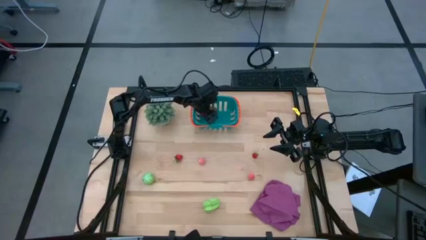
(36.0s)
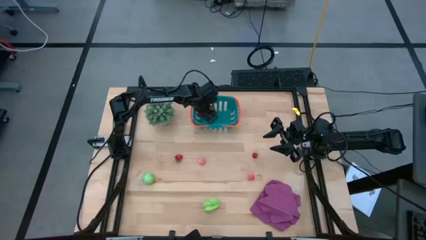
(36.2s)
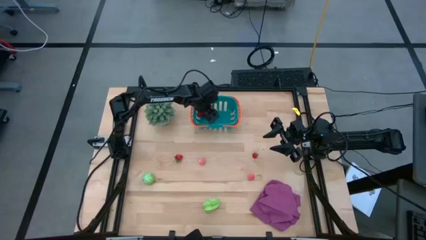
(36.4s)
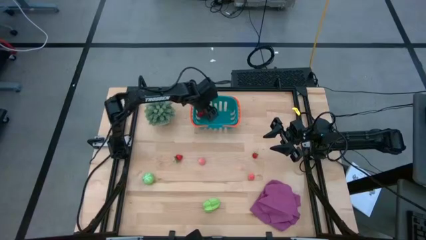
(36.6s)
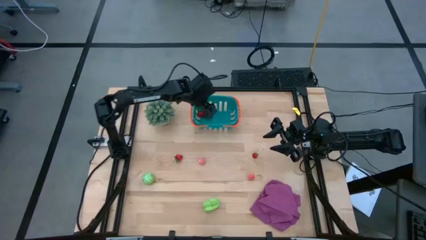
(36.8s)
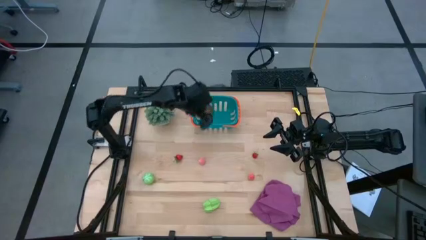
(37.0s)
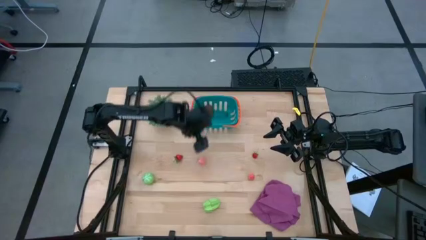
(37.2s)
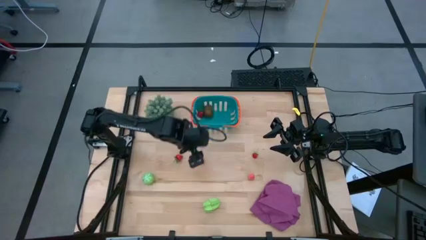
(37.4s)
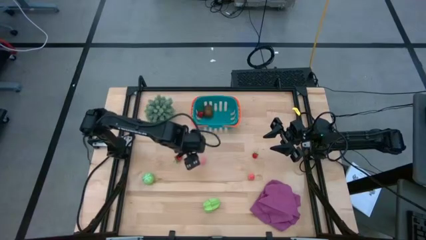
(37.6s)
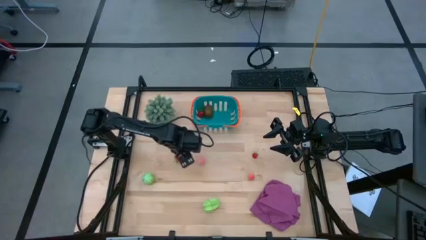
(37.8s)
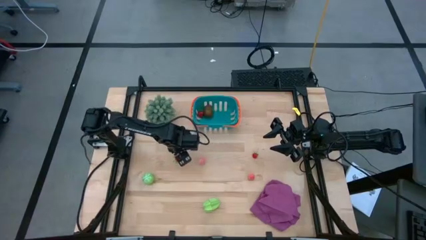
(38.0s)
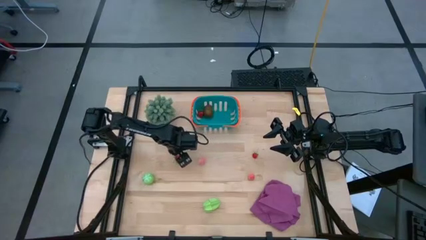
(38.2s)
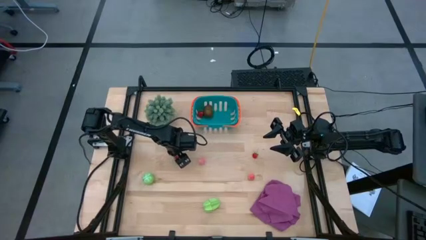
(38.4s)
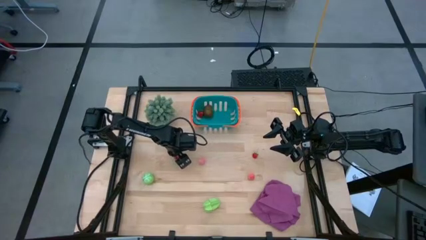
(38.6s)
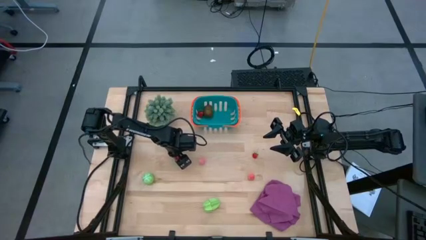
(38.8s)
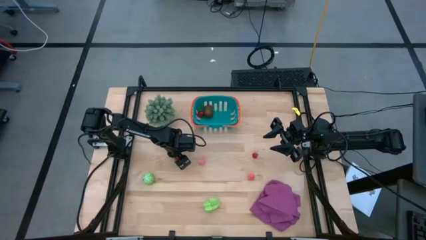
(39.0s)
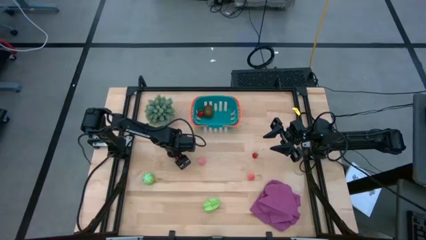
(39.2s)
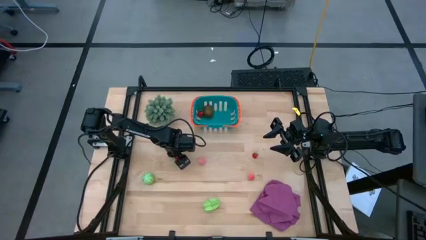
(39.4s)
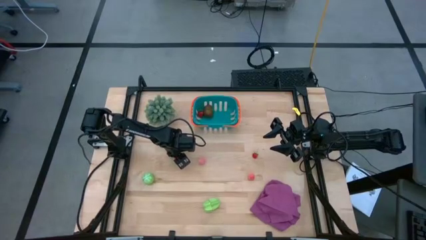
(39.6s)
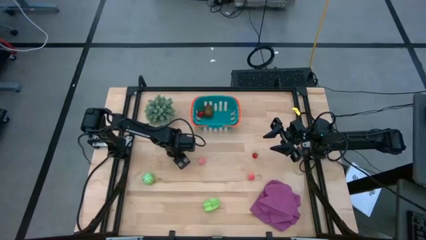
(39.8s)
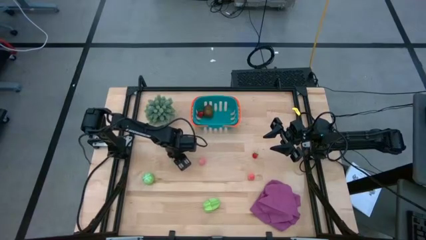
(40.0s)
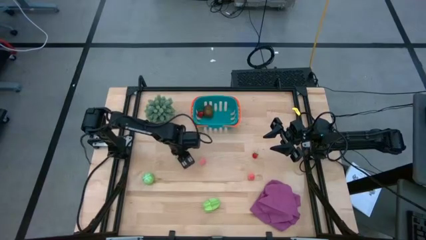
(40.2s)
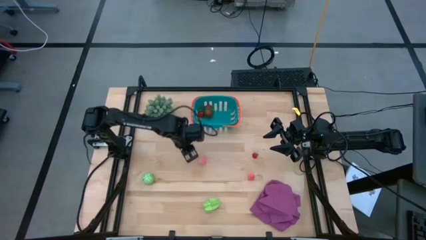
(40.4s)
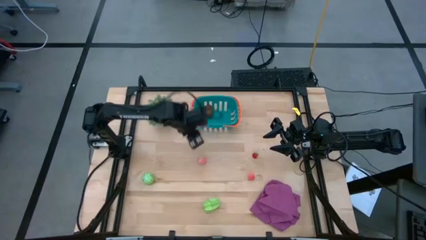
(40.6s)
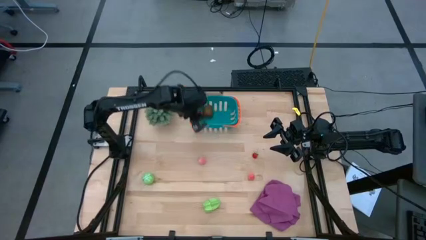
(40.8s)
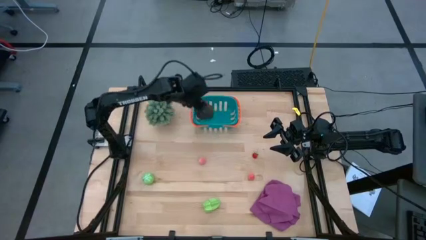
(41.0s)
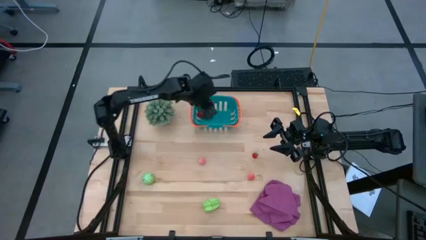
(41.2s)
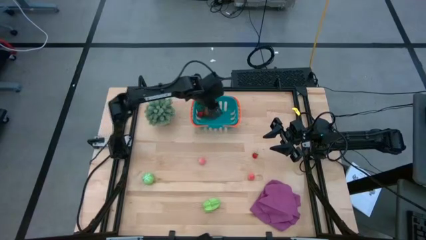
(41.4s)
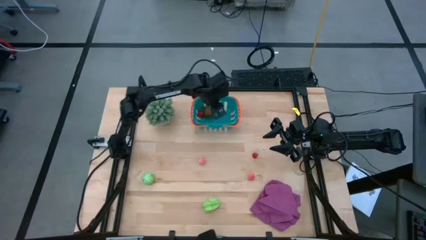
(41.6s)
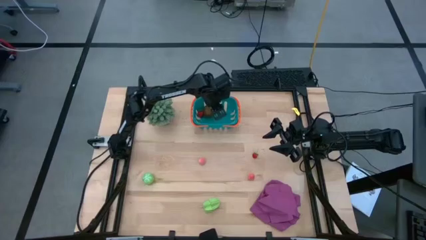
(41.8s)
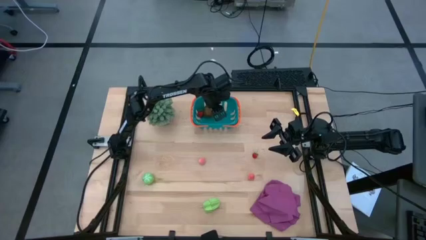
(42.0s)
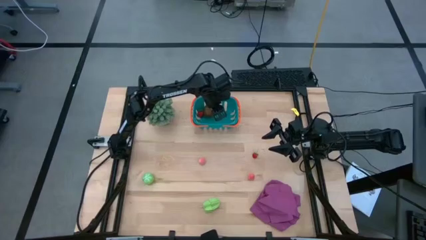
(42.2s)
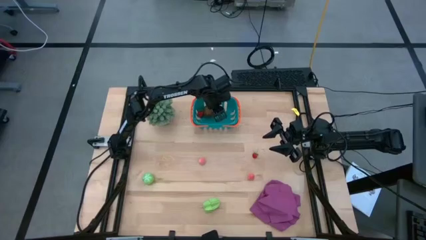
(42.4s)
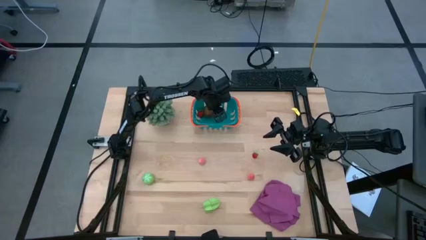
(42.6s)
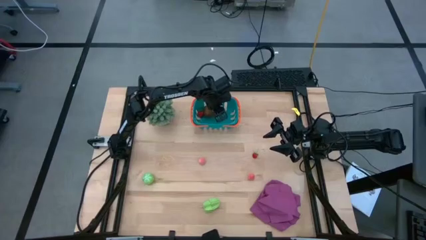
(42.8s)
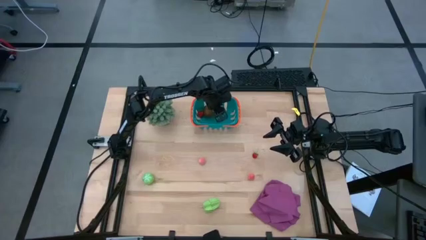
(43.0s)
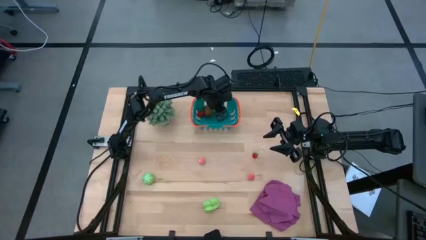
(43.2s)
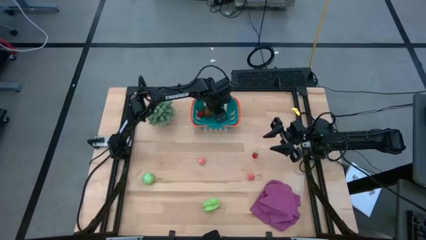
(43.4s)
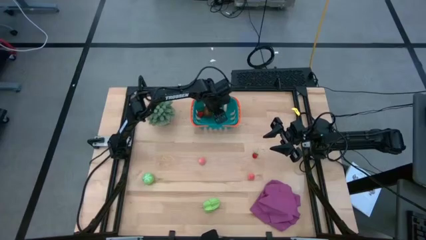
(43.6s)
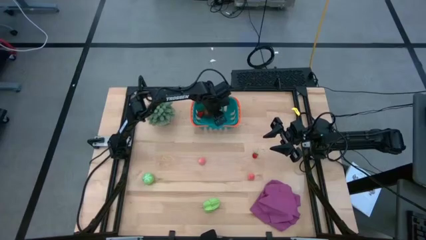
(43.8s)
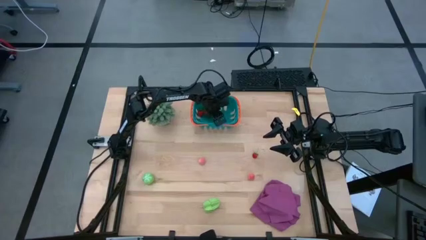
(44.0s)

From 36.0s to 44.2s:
Task: Pick and placing Produce into tupperware
Put the left red strawberry into the blue basket

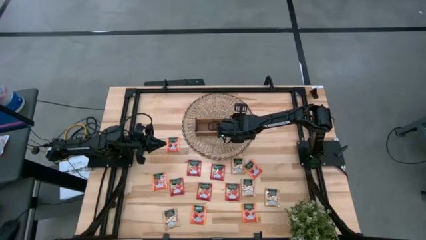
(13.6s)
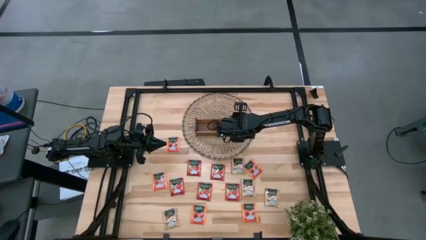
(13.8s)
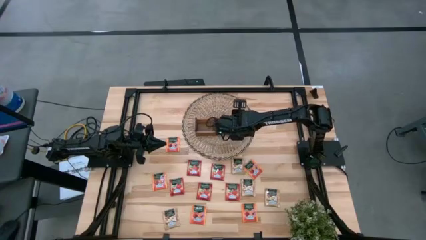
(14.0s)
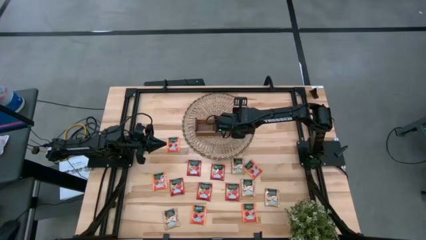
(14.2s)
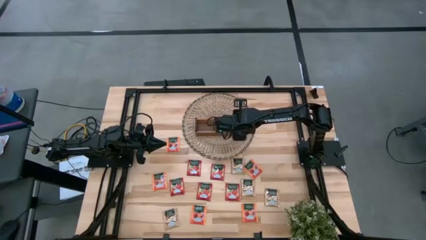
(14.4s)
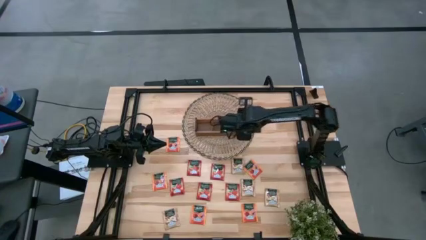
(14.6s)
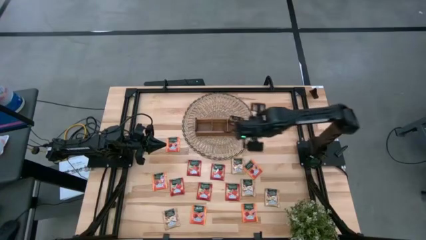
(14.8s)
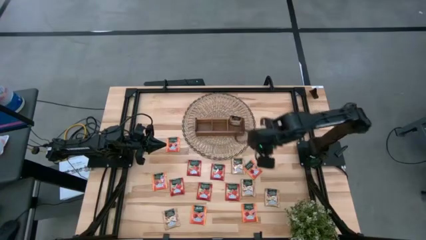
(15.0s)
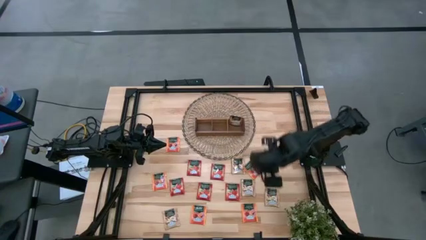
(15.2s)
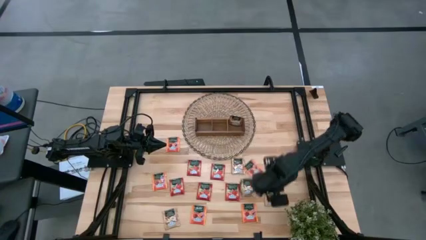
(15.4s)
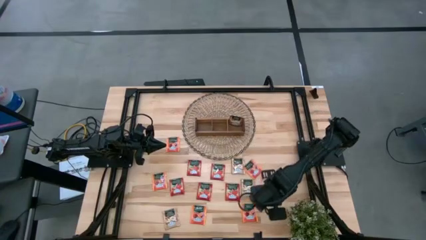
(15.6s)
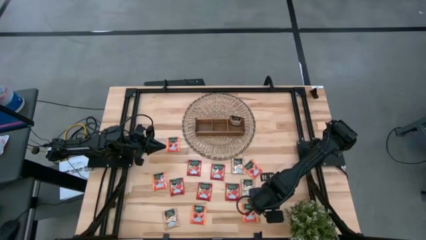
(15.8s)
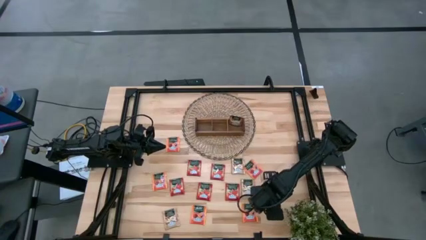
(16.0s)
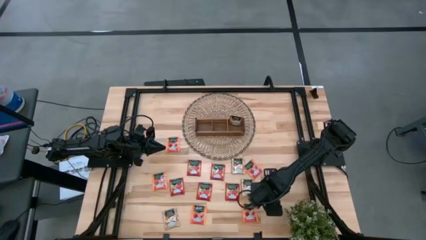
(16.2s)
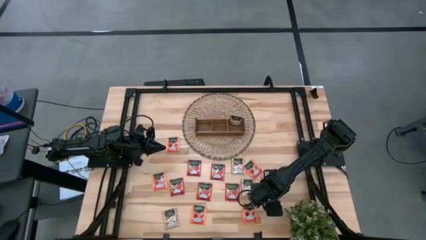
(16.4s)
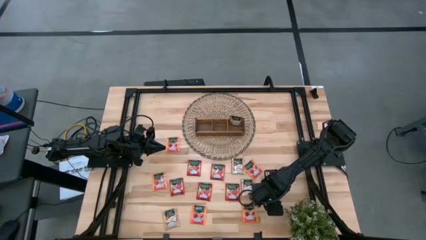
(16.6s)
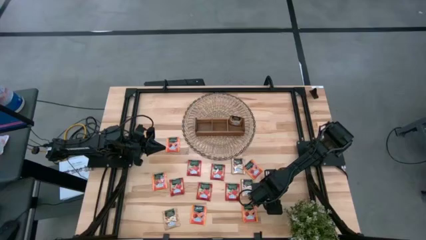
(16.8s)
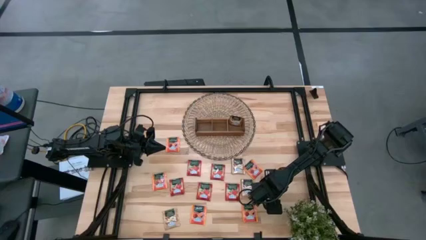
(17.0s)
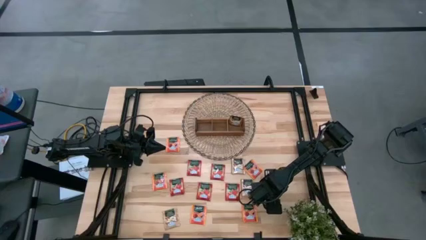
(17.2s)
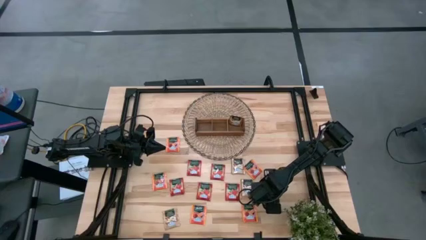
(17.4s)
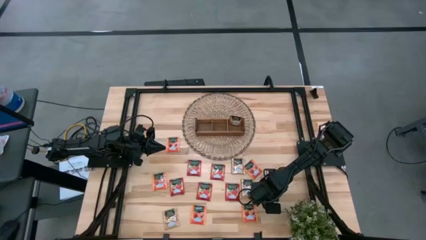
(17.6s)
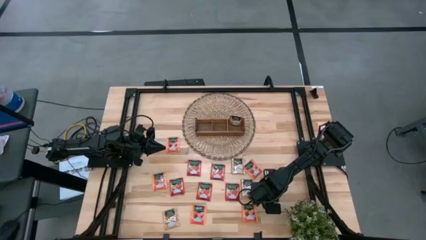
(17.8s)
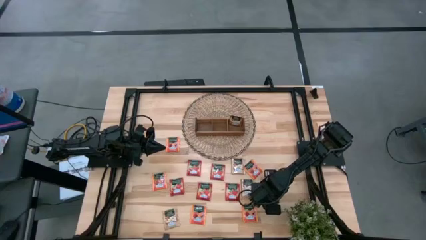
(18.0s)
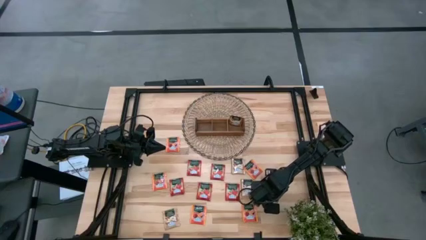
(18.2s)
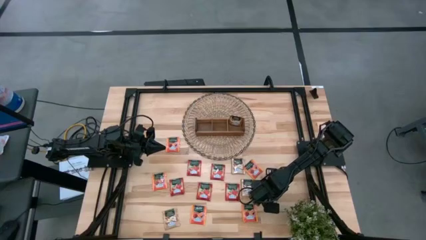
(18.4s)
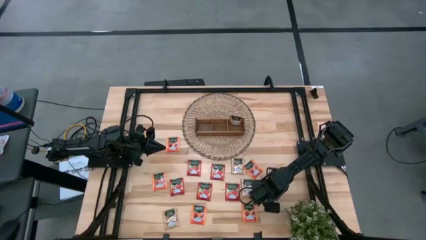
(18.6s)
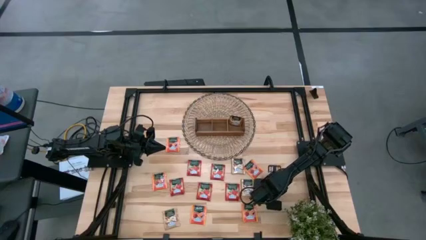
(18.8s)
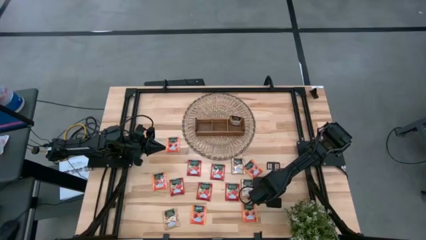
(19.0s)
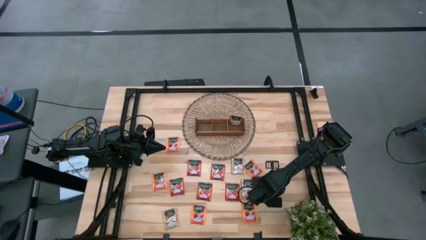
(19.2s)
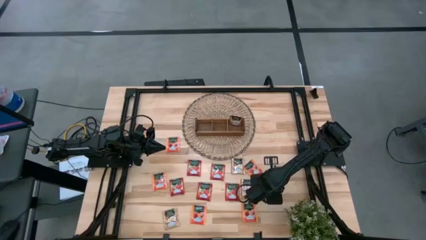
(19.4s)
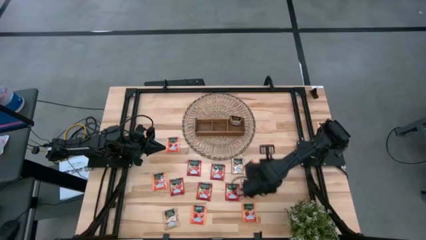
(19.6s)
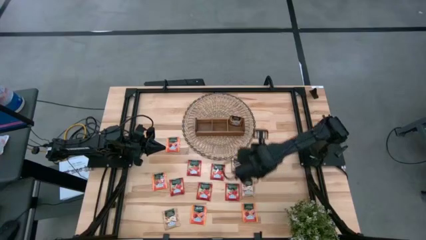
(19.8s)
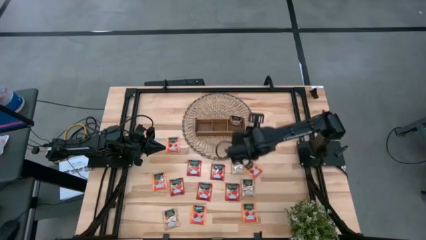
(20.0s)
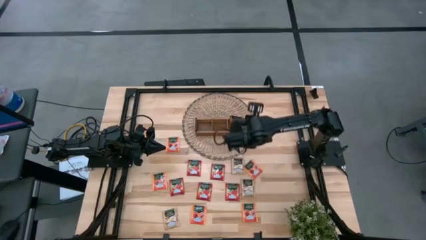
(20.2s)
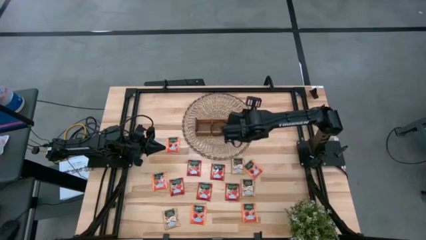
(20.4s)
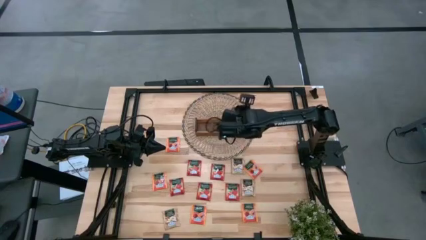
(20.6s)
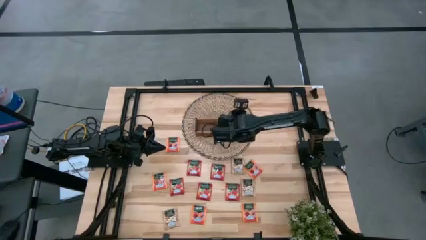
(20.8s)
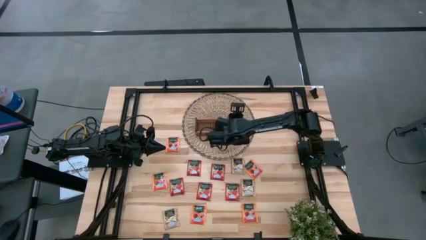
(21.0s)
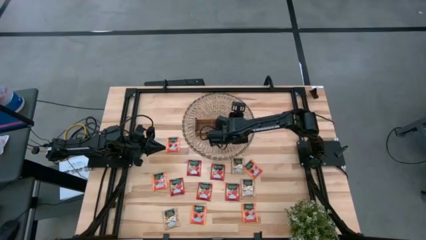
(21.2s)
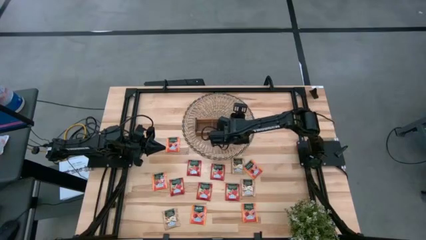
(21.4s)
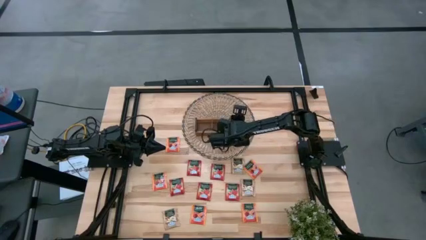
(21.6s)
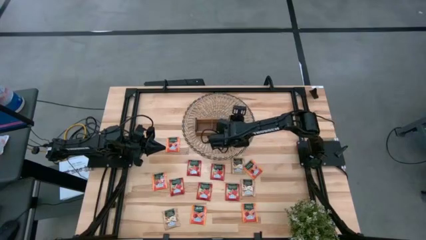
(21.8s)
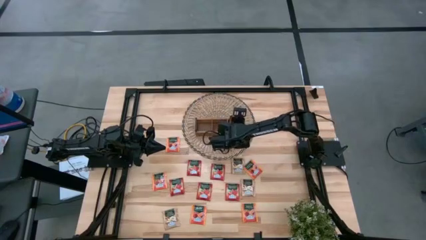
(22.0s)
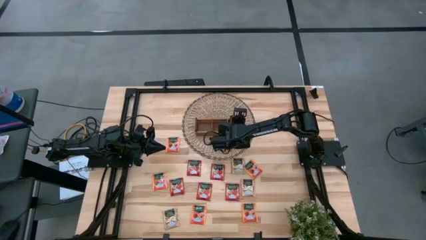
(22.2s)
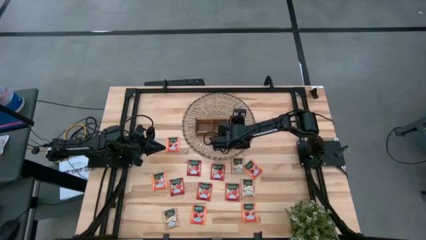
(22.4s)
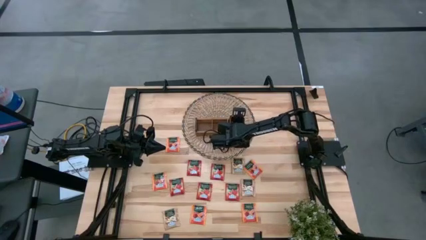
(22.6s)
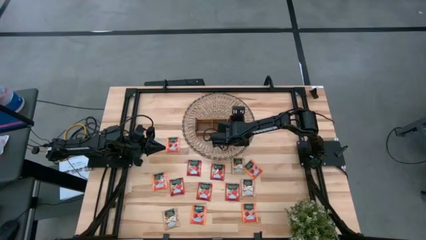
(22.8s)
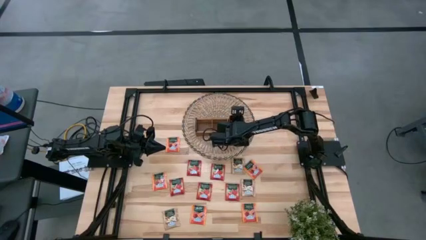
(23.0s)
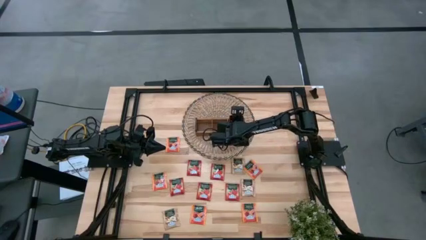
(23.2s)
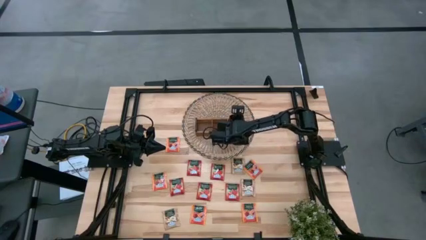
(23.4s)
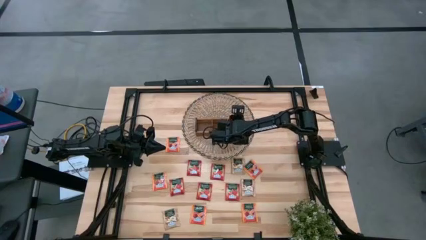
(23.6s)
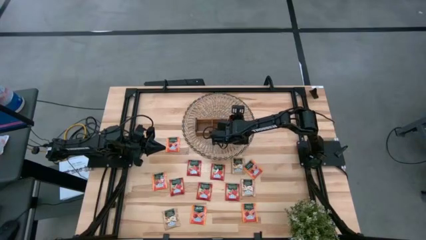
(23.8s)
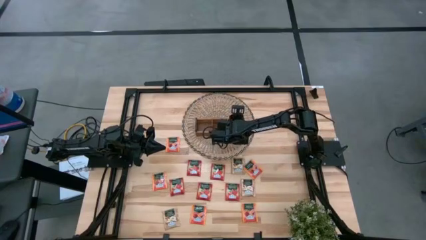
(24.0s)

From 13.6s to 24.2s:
Task: Pick & Place Tea
Put the brown tea bag into the right slot of the wooden organizer
